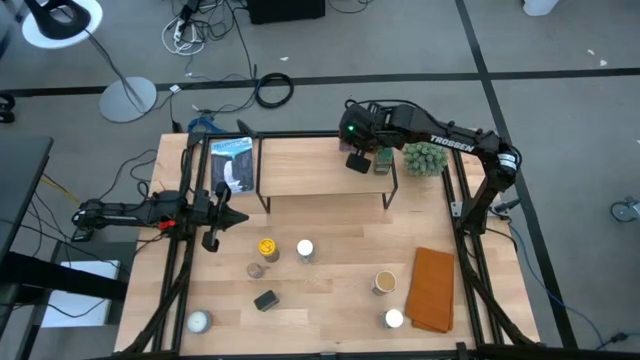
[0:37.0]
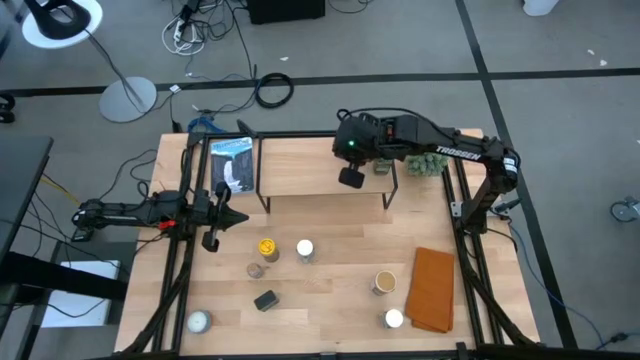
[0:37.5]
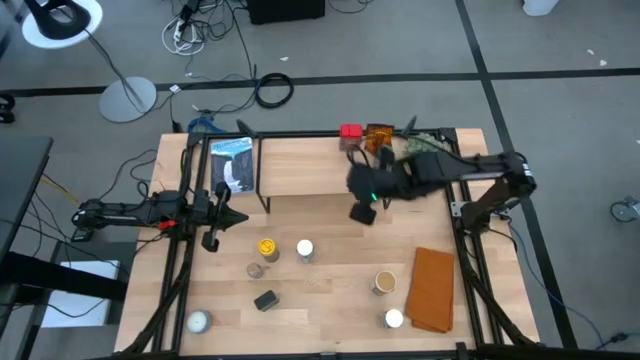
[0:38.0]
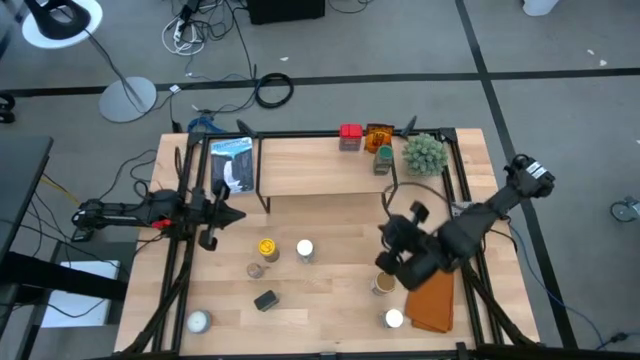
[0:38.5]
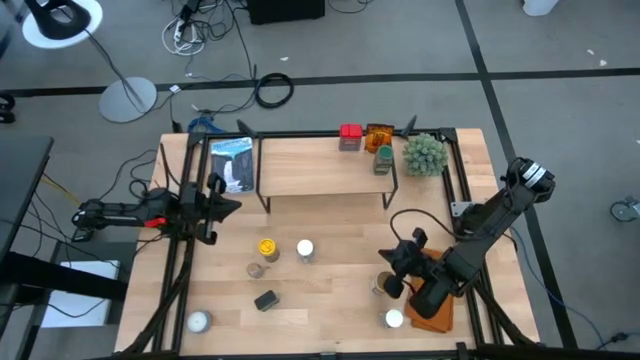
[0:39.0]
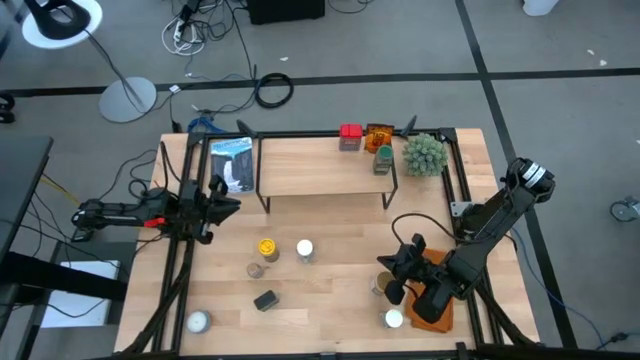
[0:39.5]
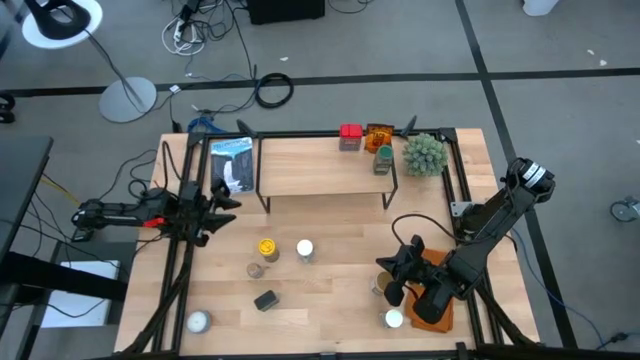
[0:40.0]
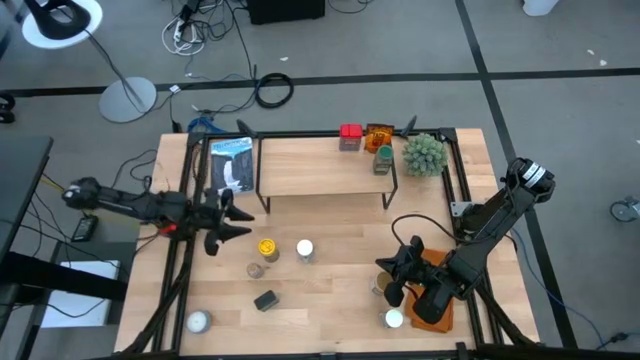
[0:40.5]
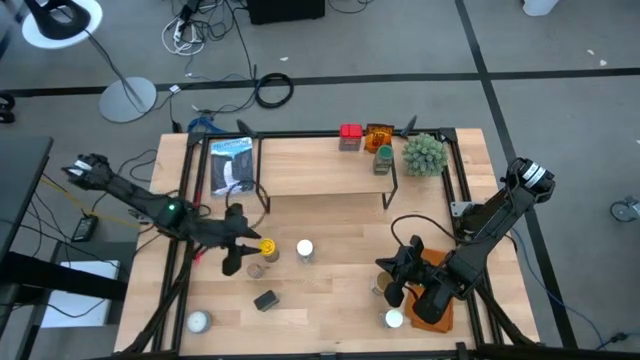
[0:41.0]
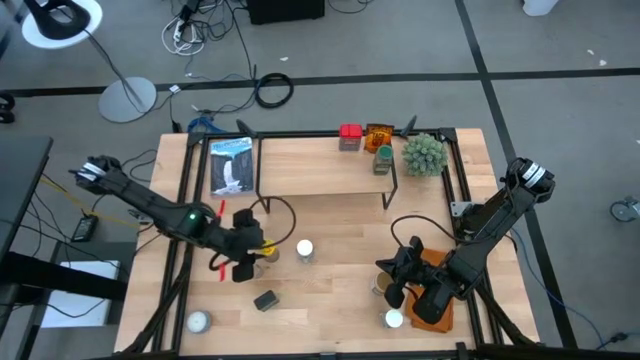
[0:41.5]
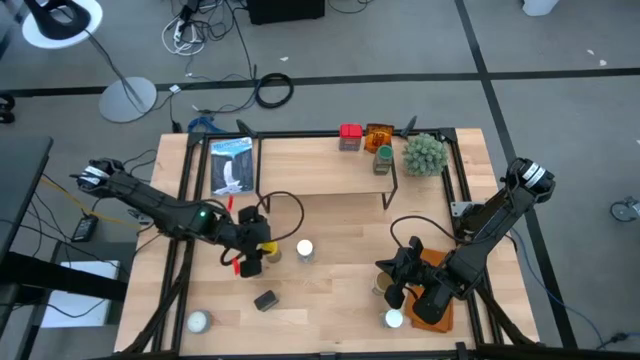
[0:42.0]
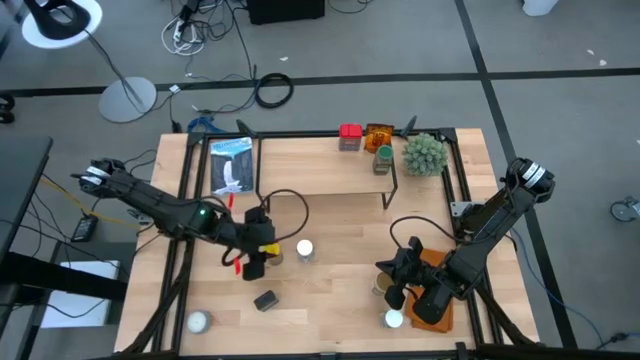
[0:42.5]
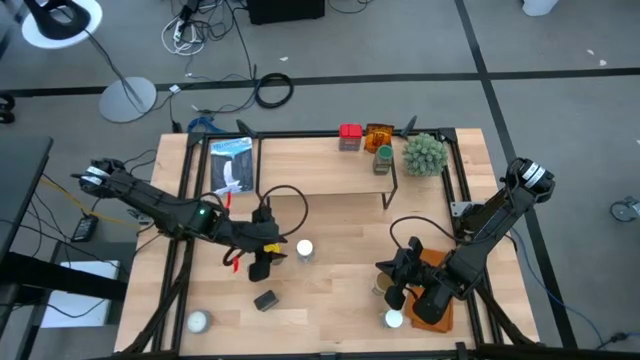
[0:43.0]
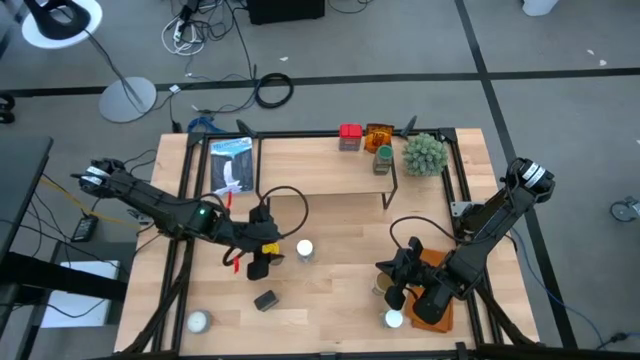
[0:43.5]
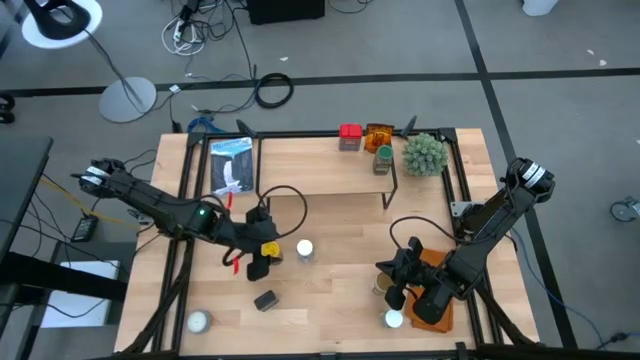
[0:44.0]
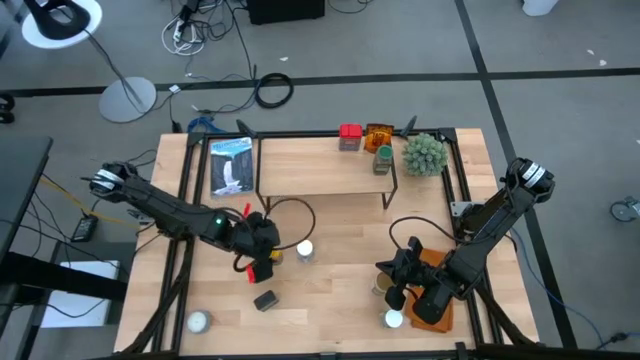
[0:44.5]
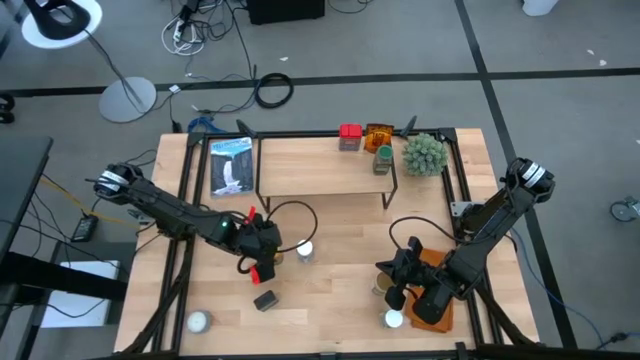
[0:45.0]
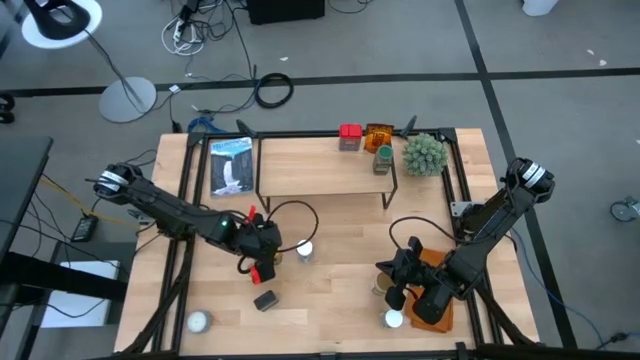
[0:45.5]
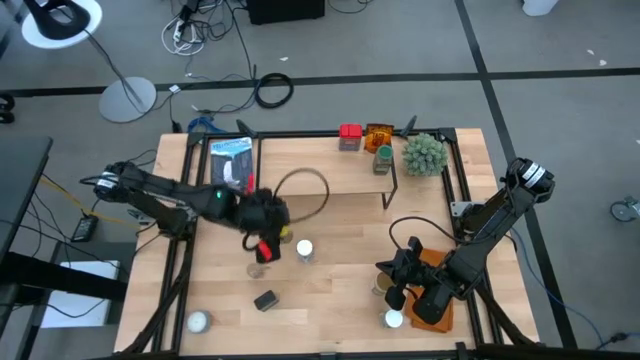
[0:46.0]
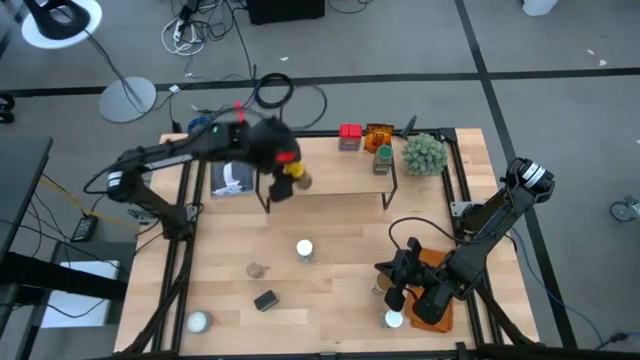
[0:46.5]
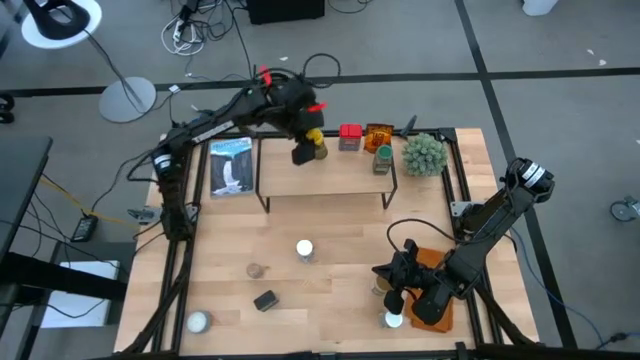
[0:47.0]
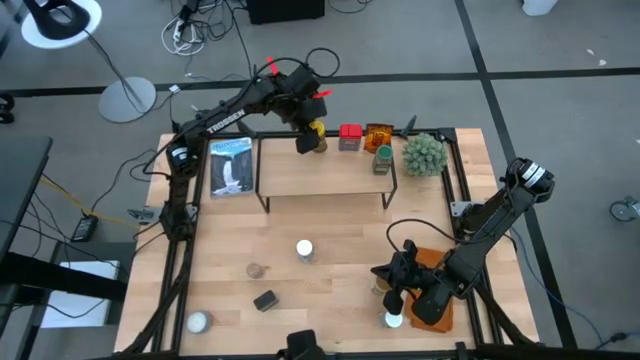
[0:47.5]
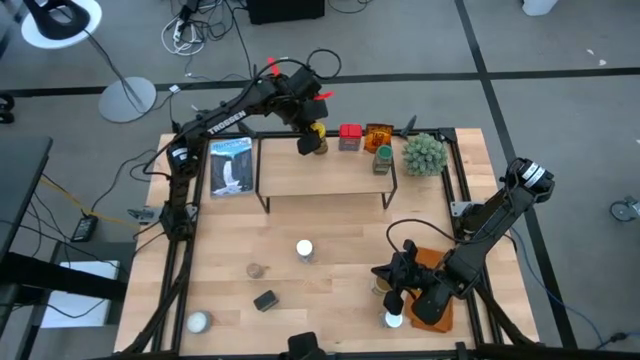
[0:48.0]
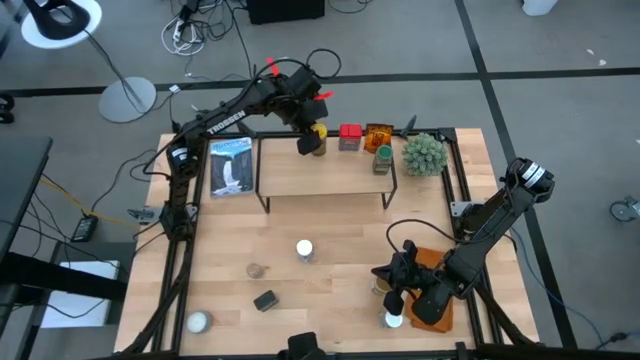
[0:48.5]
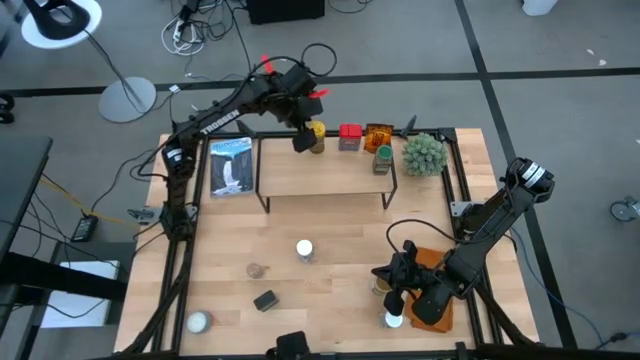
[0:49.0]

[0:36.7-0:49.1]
Task: Shelf spices
Put the yellow seasoning bottle on the shelf

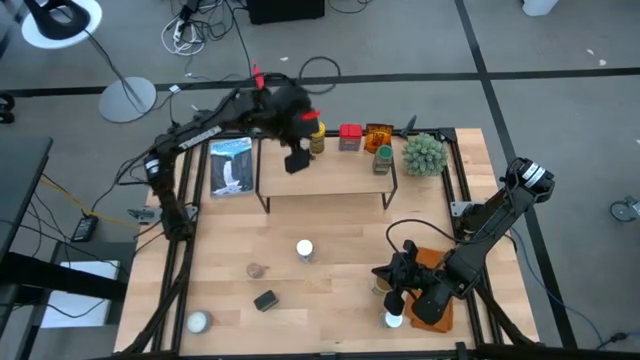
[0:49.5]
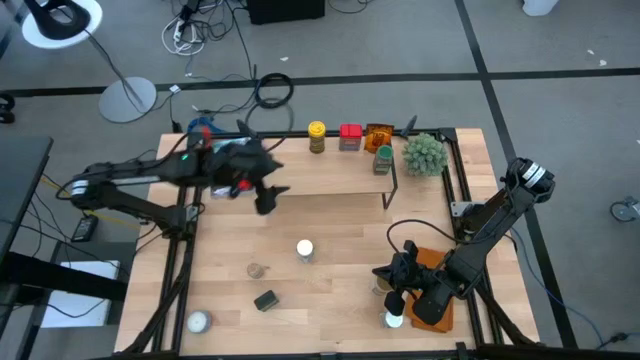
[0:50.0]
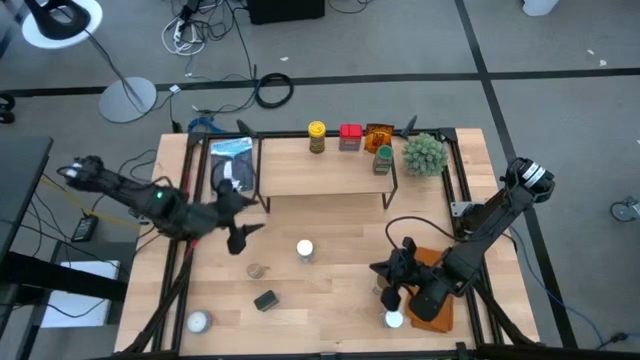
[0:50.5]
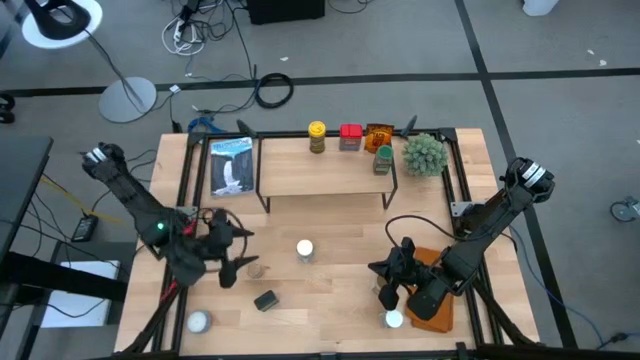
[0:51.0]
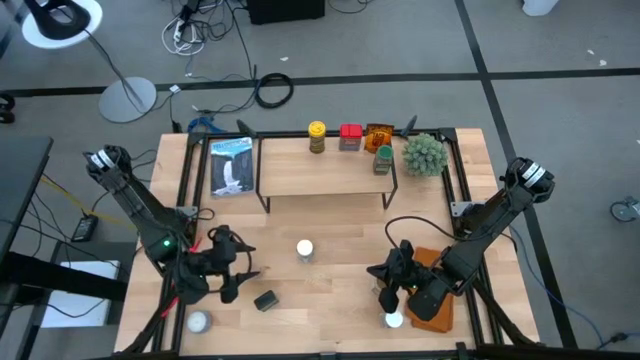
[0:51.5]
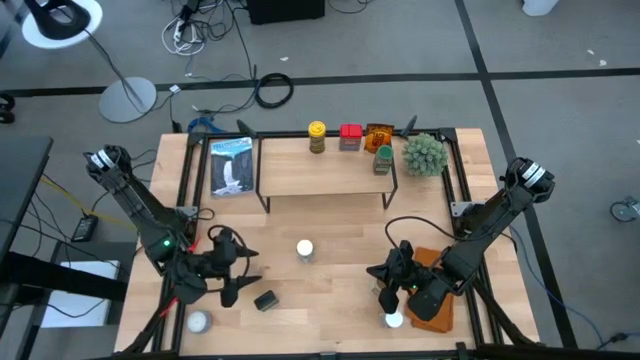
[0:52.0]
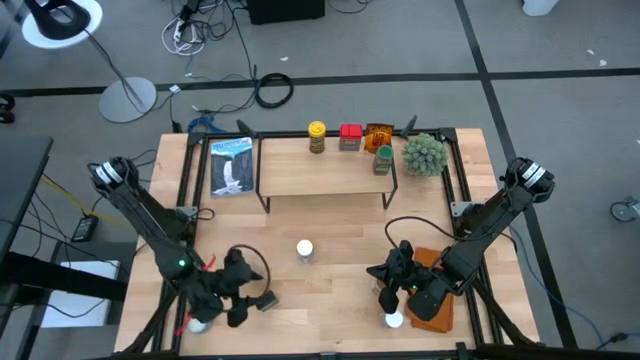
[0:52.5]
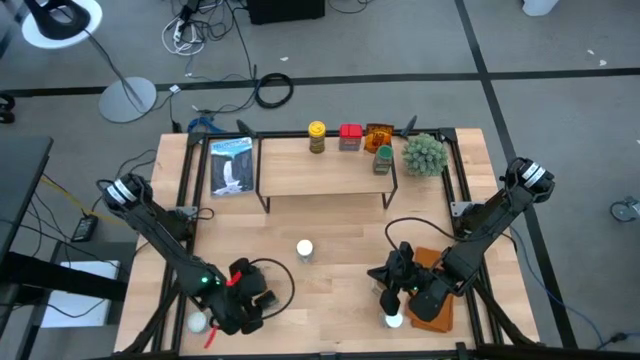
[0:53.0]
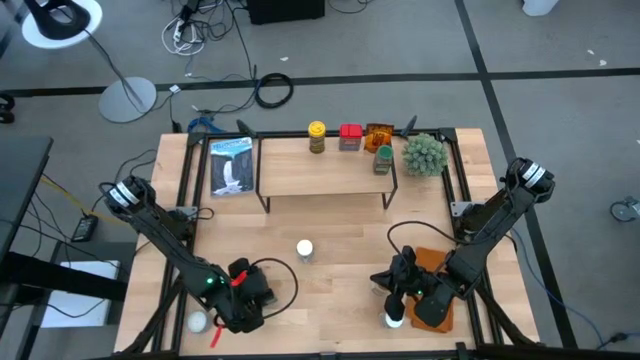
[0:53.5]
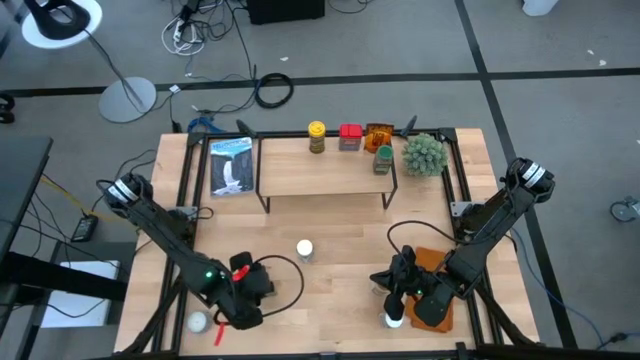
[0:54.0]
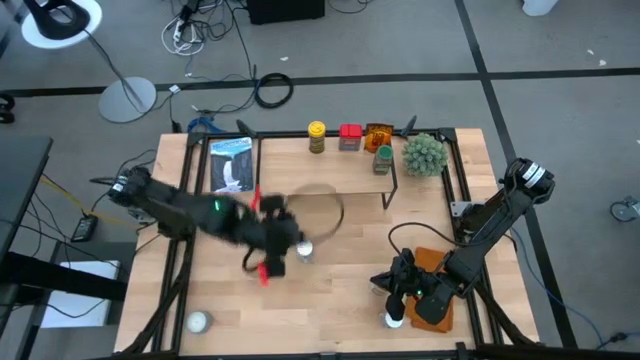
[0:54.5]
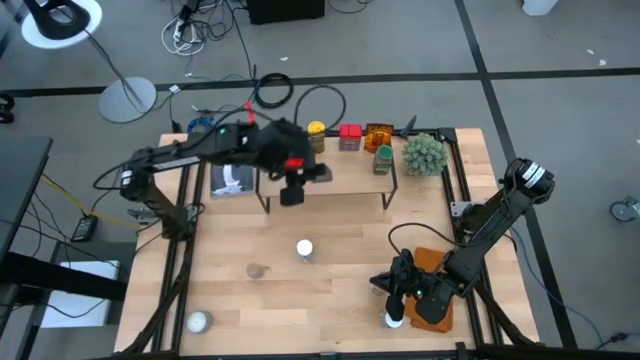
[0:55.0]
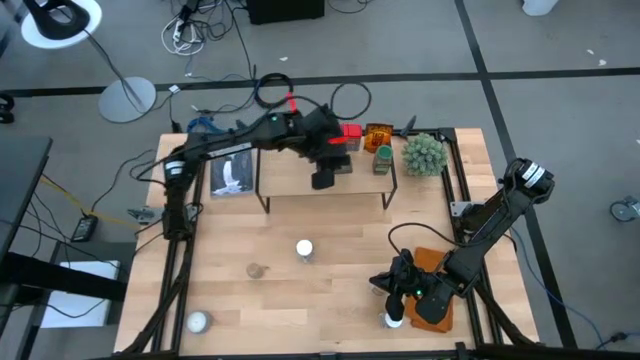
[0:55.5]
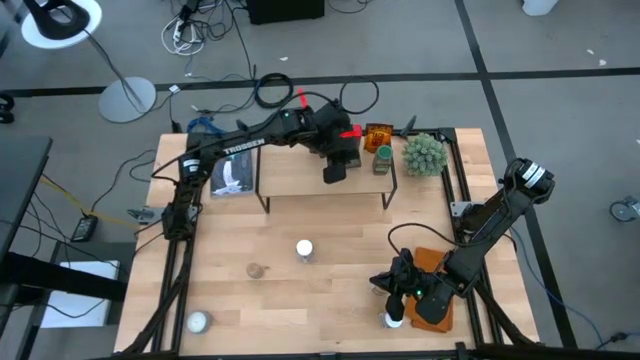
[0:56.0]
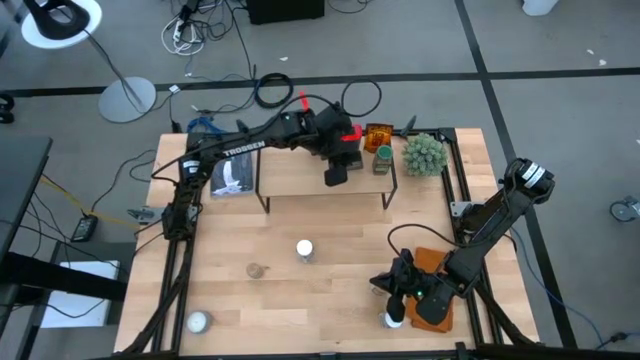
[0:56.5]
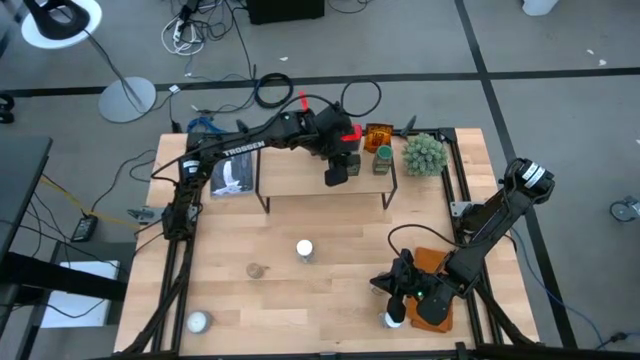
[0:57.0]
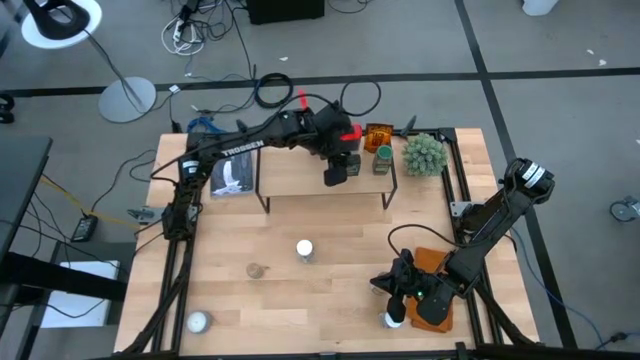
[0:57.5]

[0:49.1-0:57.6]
Put the black seasoning can on the shelf

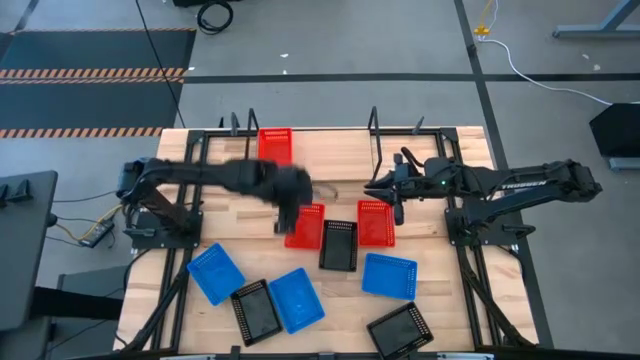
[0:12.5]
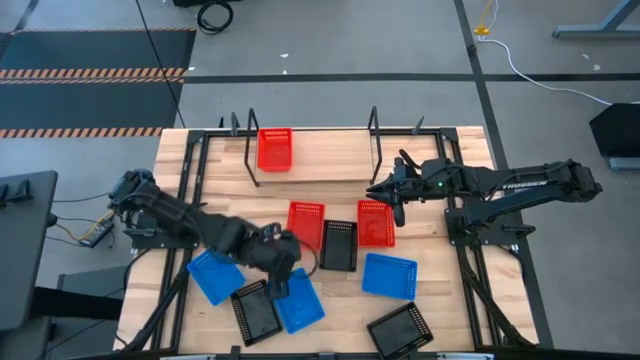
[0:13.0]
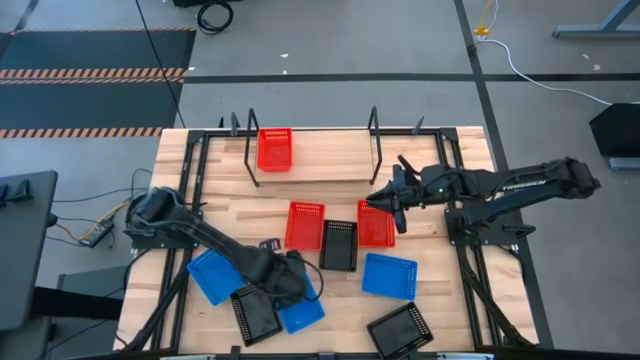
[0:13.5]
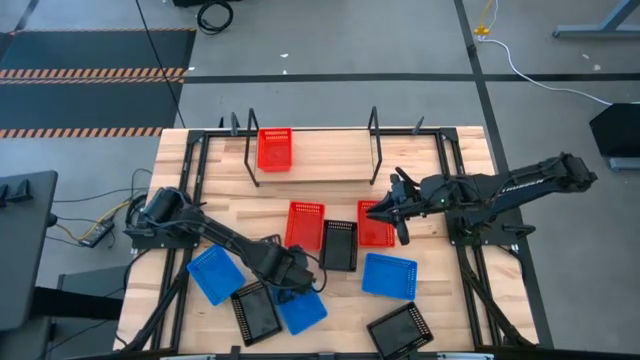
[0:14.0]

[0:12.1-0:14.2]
Task: Stack baskets on shelf by color
Put the middle blue bin on the shelf
